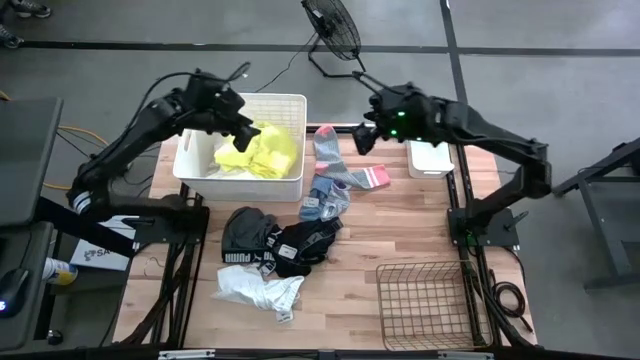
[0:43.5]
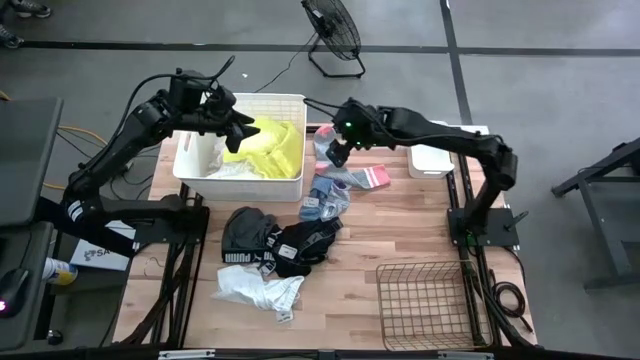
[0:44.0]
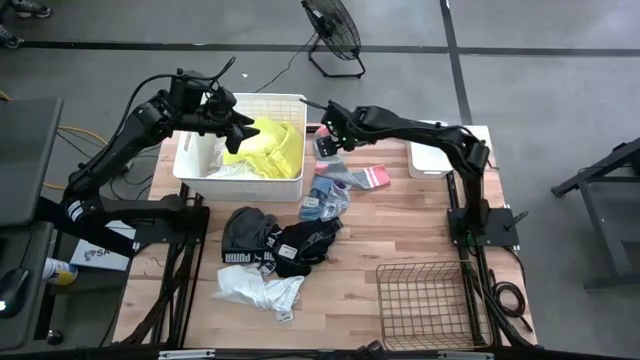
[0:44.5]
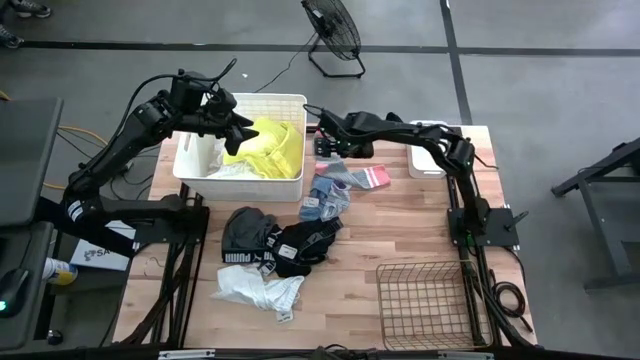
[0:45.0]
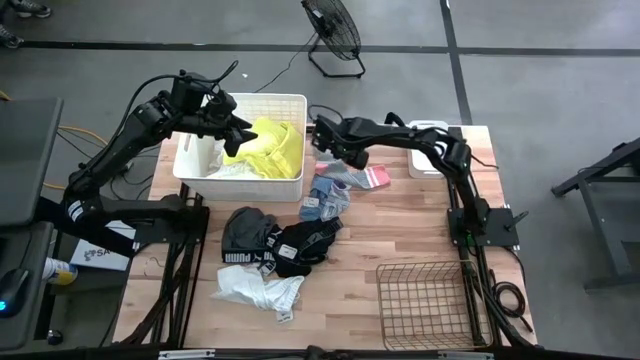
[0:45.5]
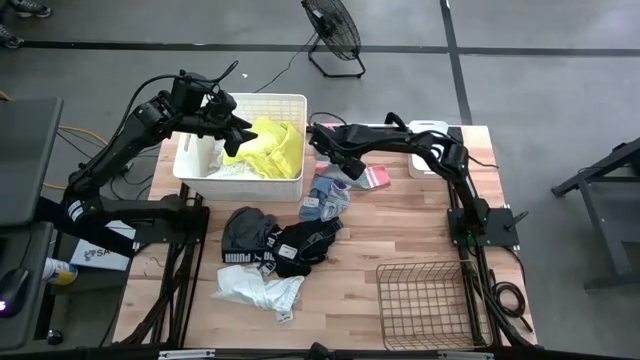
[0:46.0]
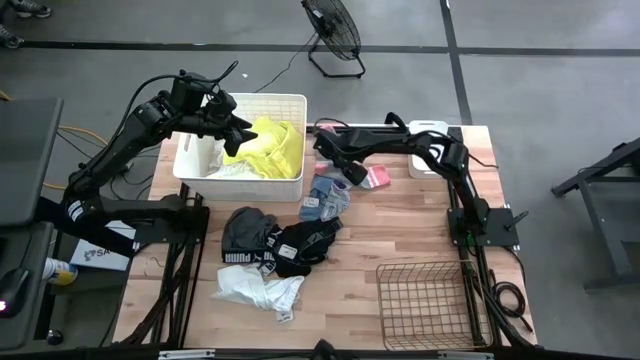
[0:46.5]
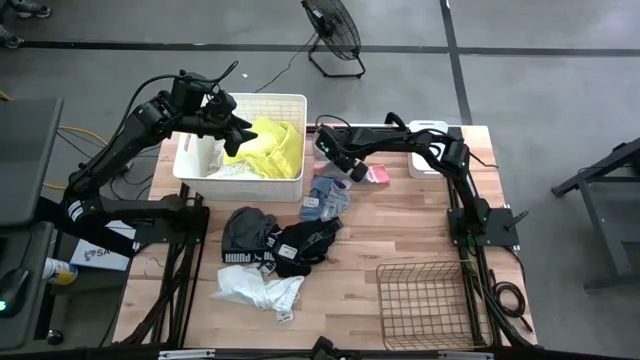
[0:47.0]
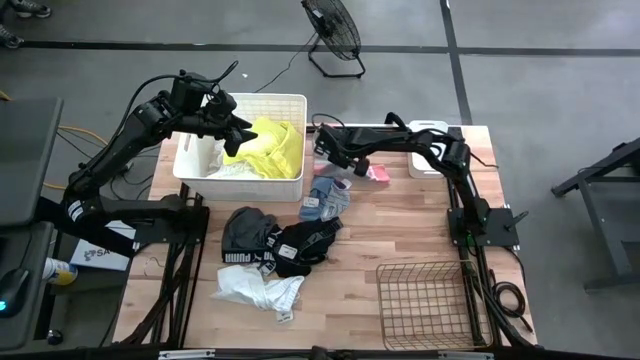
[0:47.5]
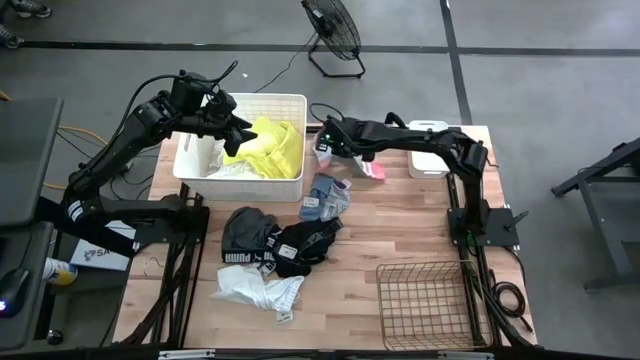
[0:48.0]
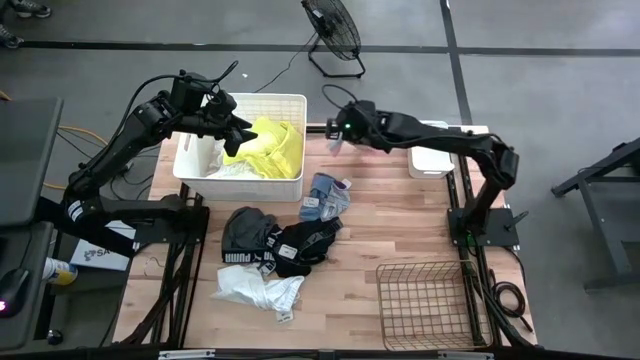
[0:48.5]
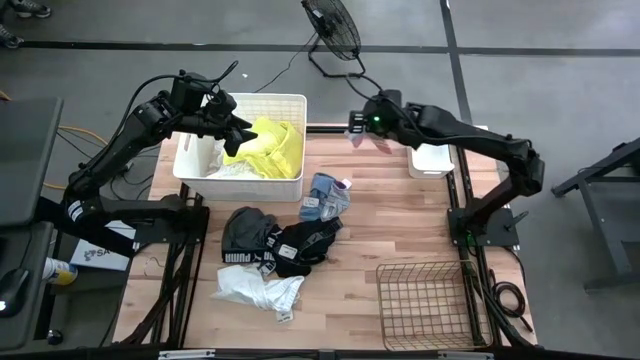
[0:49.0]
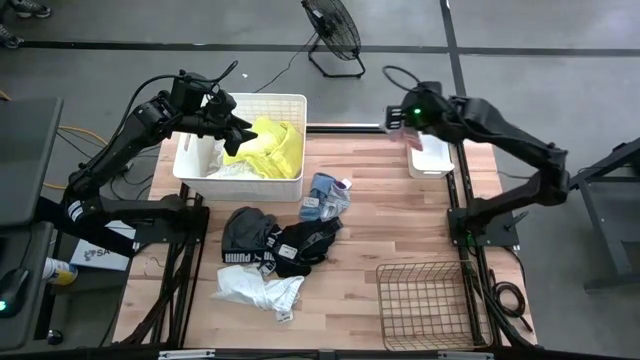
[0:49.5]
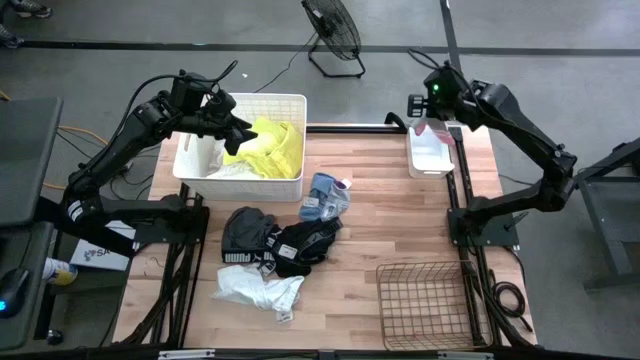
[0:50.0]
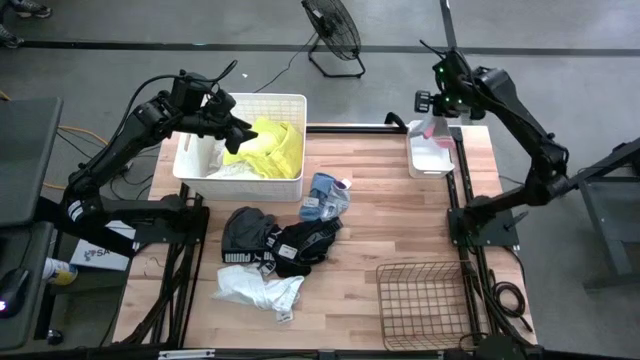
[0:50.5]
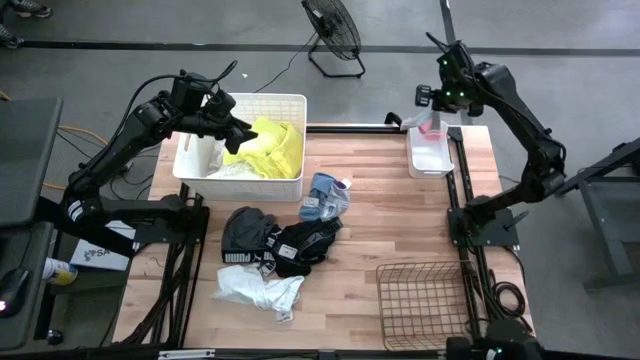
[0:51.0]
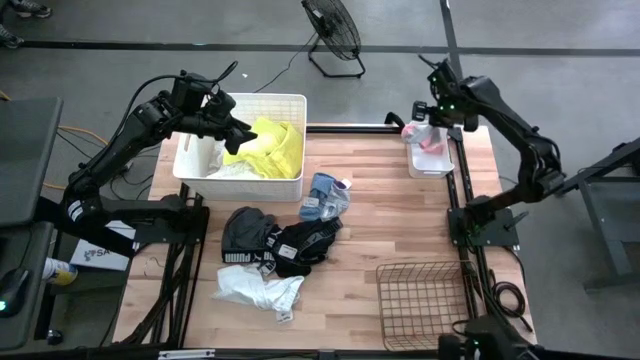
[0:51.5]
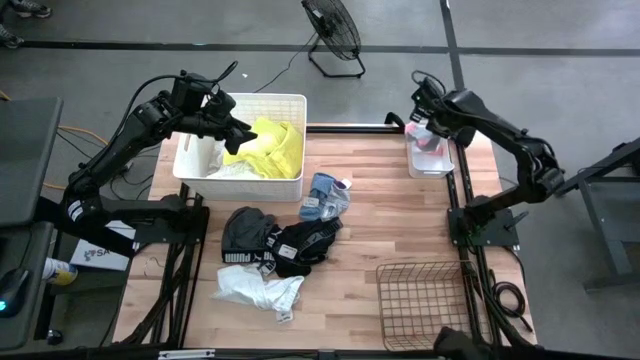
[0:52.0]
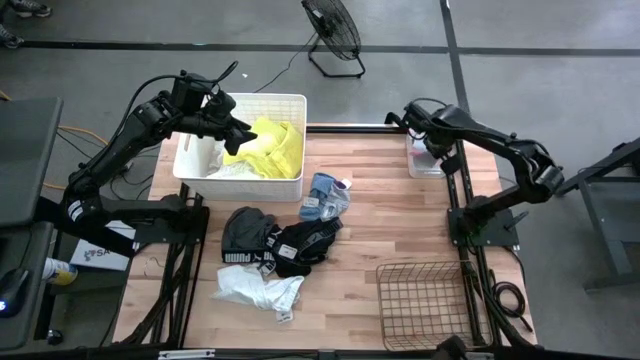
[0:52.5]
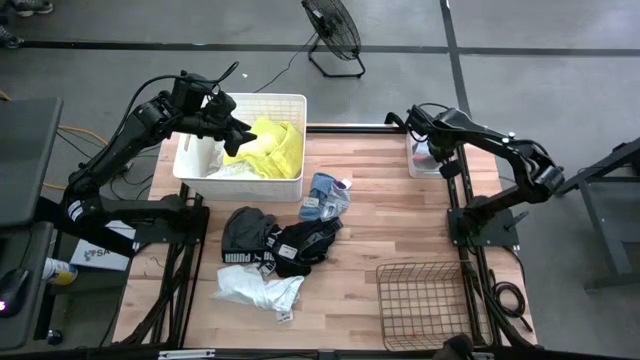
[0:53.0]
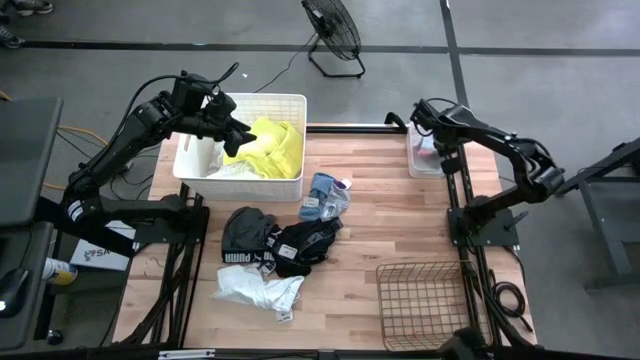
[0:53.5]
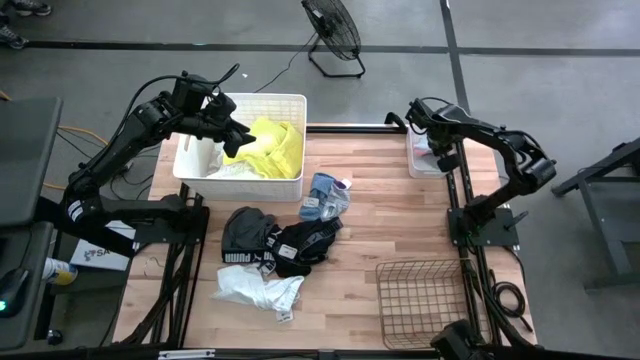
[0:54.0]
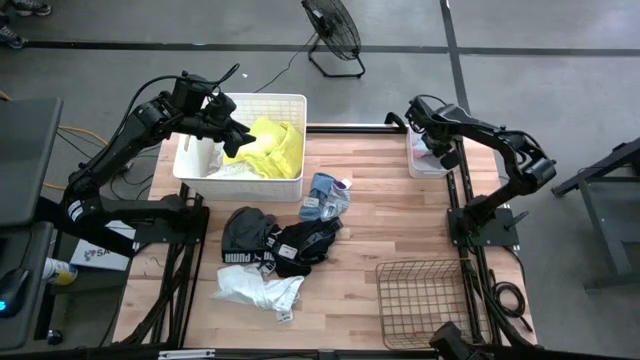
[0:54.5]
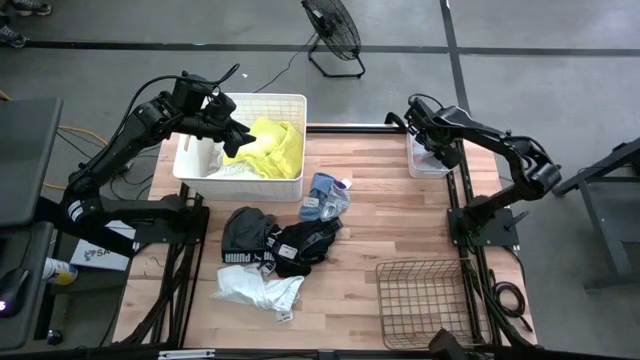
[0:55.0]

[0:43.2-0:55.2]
Task: Pick & Place Cloths
Put the pink sock into the small white bin

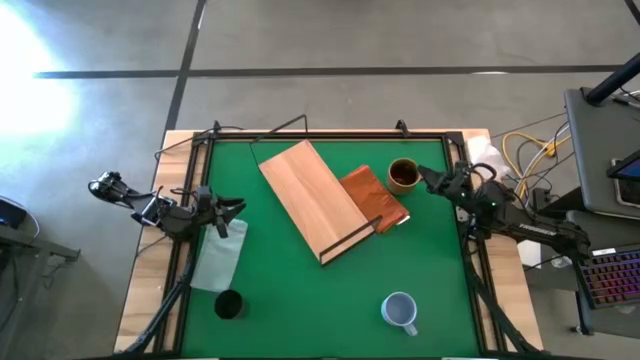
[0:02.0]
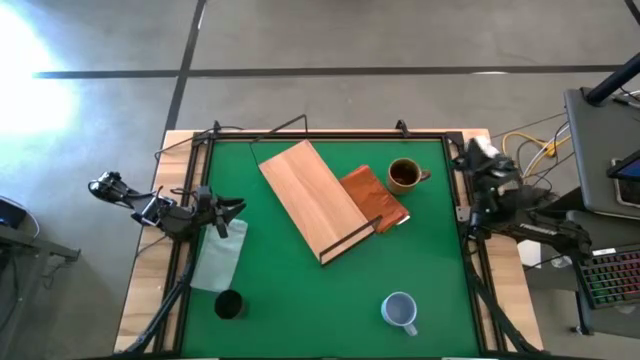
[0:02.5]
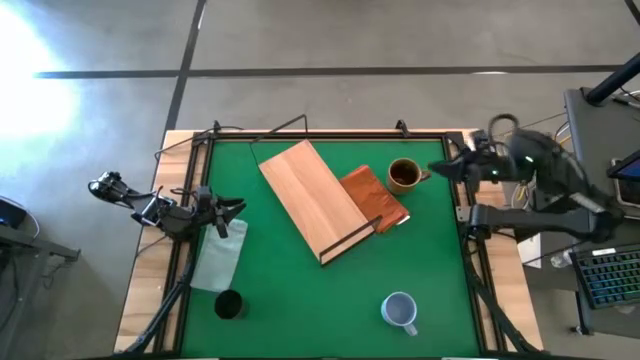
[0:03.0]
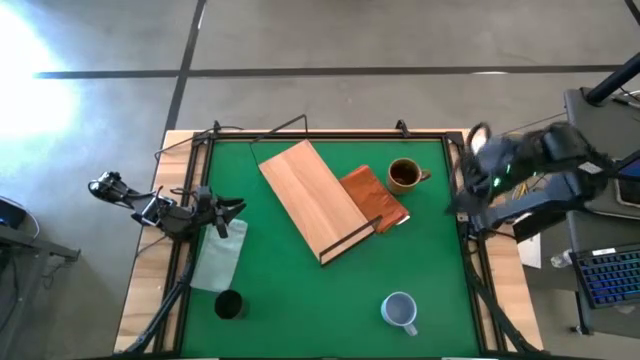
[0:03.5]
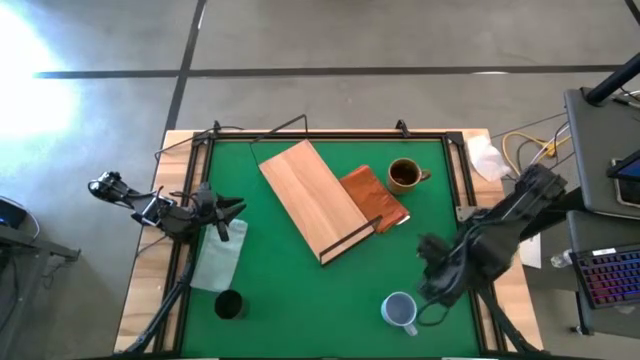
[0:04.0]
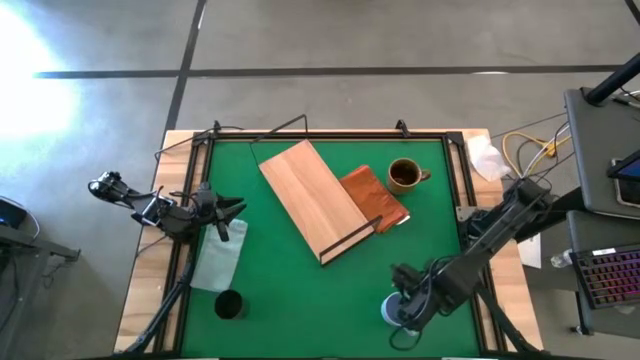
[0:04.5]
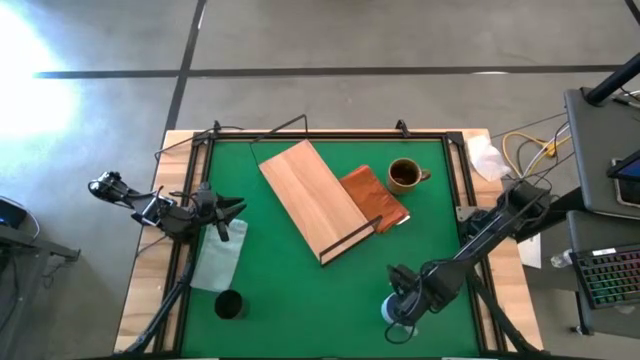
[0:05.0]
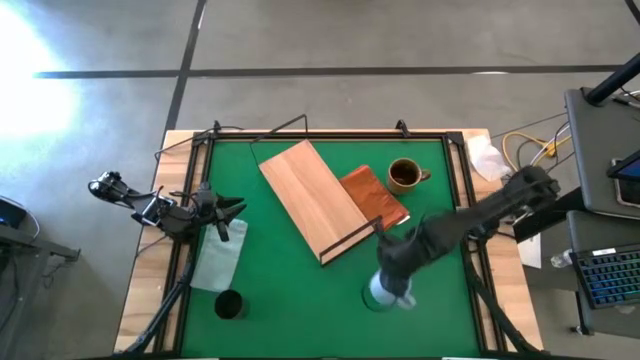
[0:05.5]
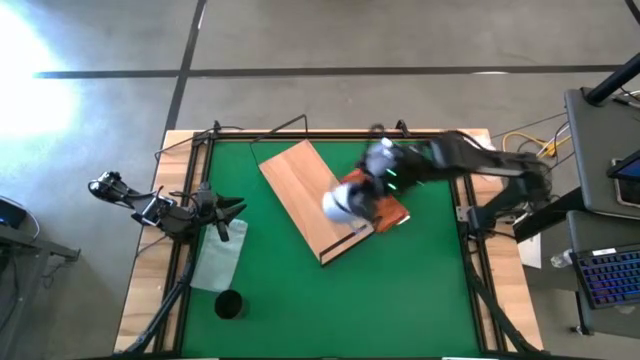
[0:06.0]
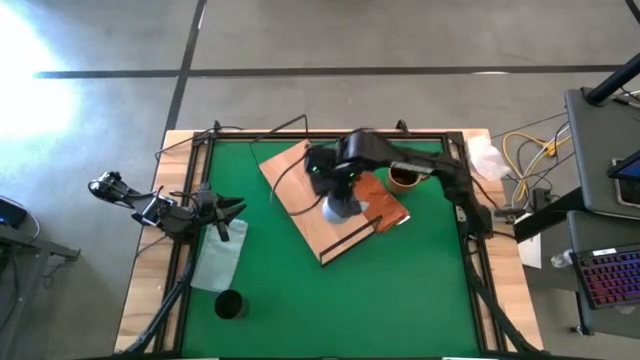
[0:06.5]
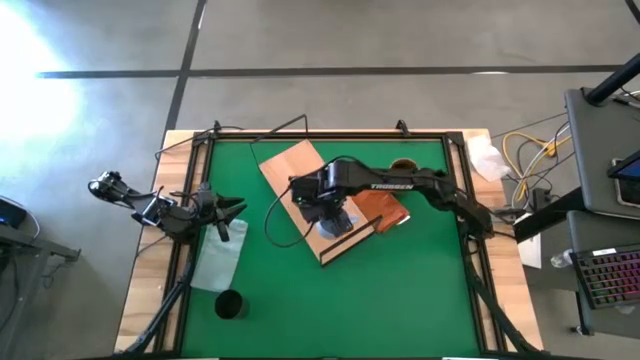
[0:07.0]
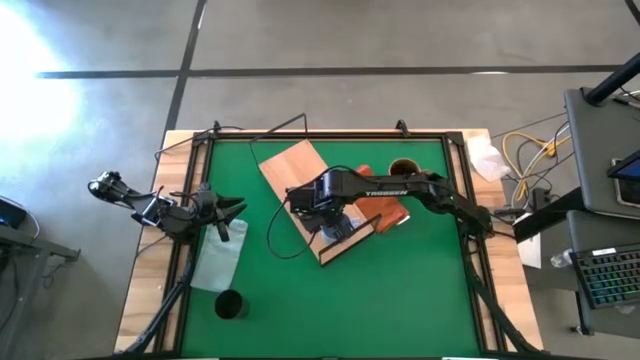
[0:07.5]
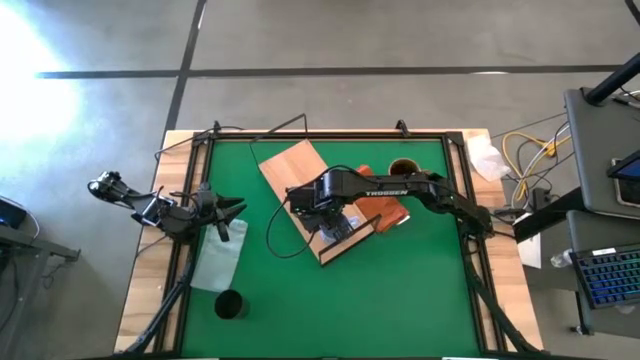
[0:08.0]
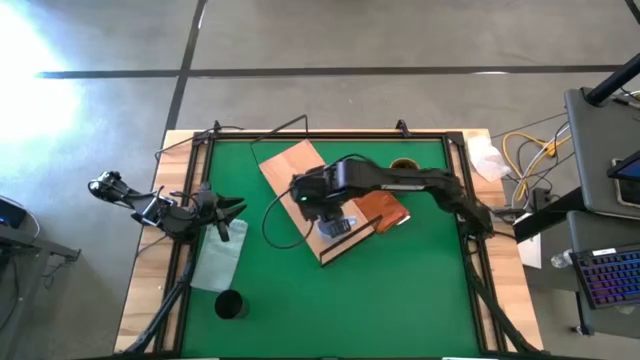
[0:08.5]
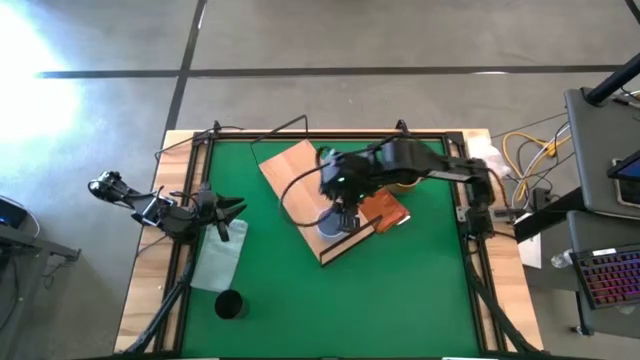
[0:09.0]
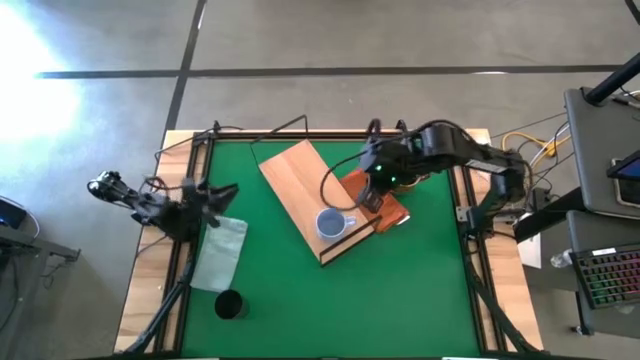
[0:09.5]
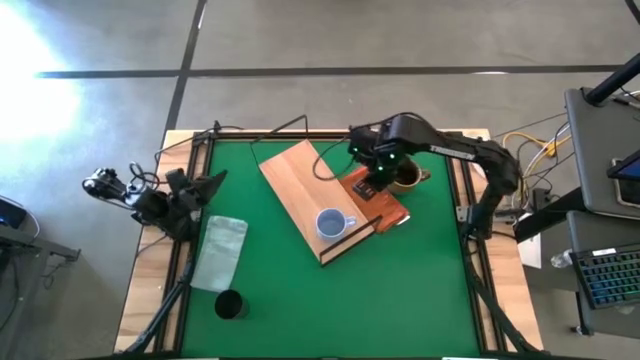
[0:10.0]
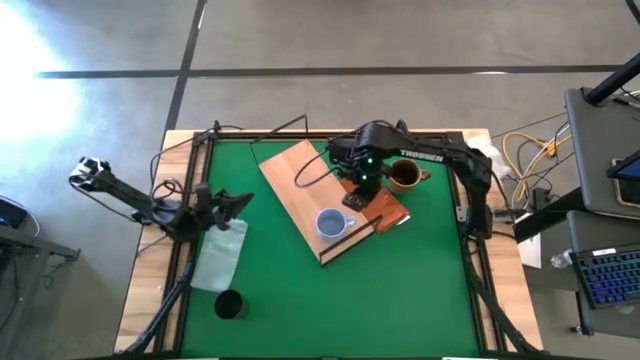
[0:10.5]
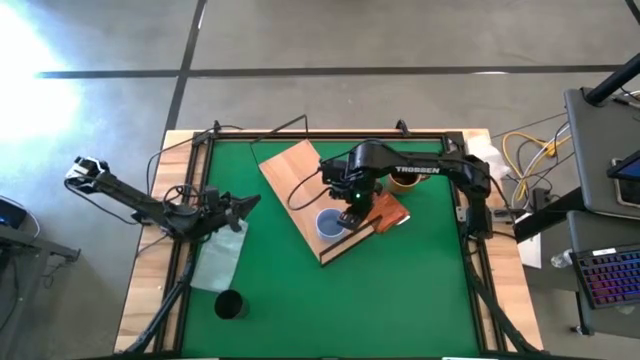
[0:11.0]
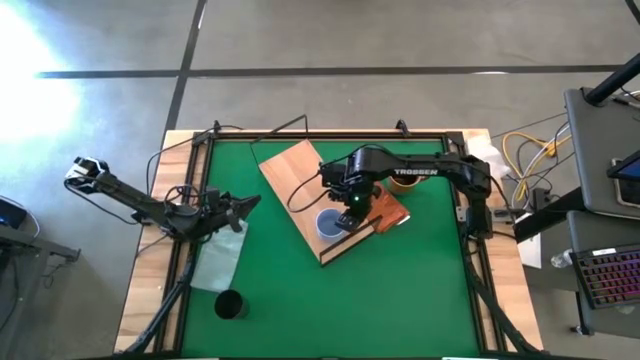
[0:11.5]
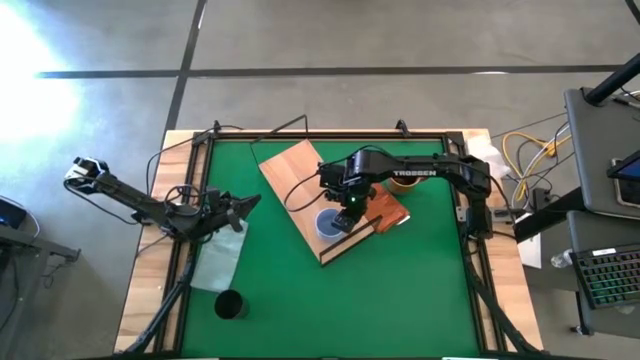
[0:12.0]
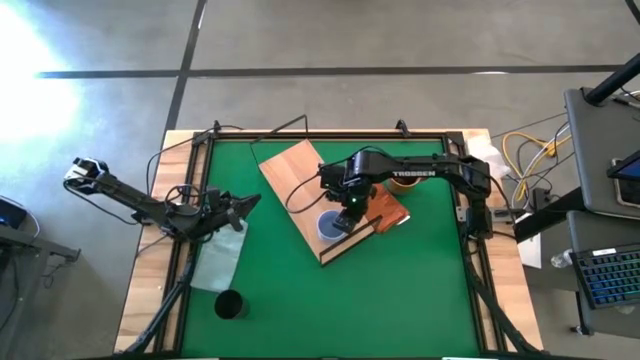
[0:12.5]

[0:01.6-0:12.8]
Task: Stack small to large cups/mugs on shelf
Put the blue mug on the shelf
